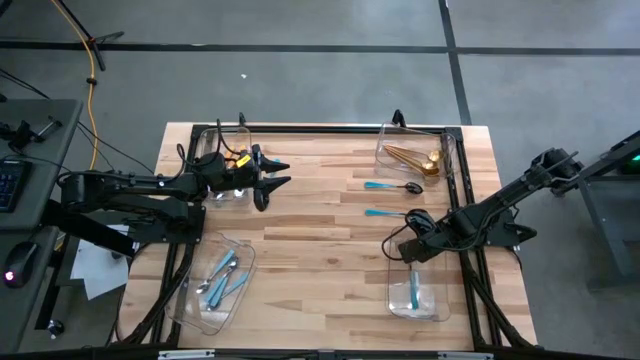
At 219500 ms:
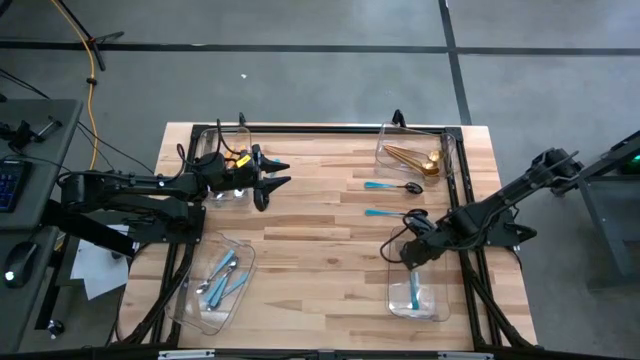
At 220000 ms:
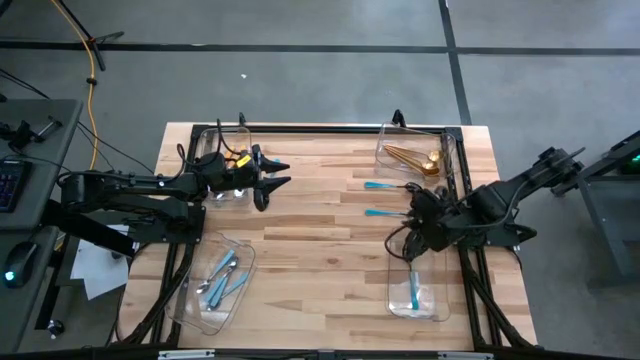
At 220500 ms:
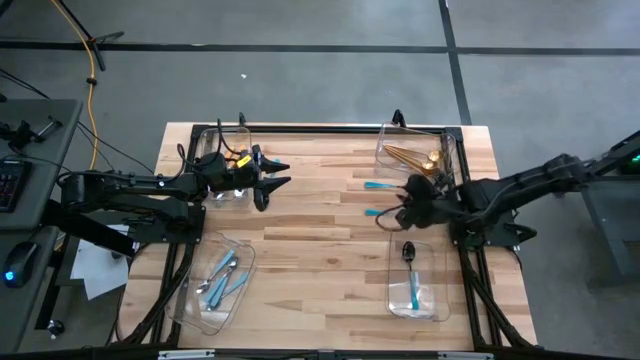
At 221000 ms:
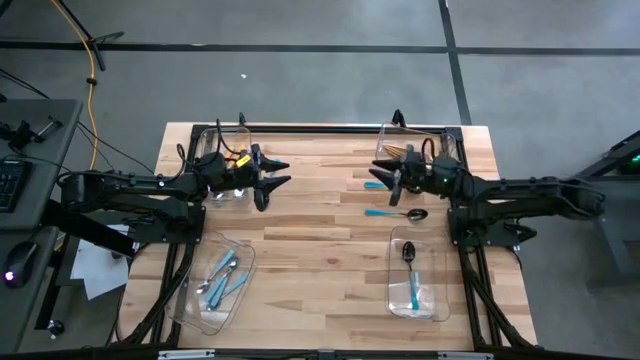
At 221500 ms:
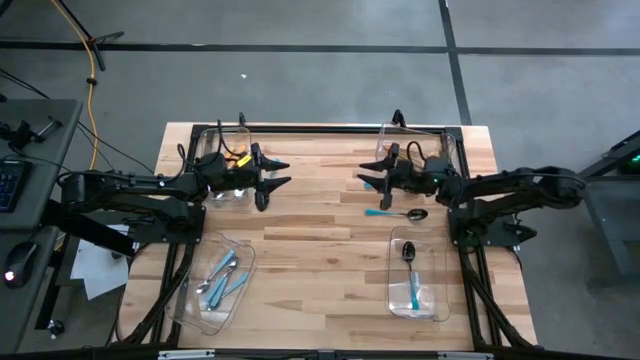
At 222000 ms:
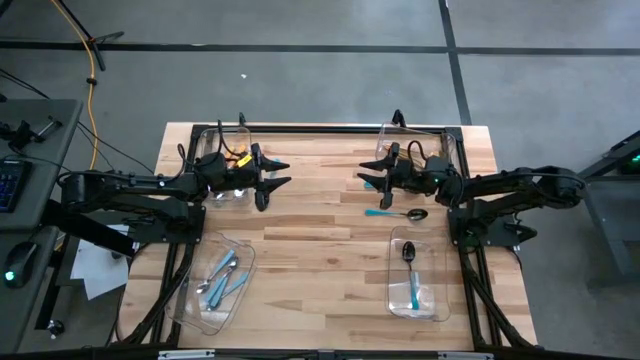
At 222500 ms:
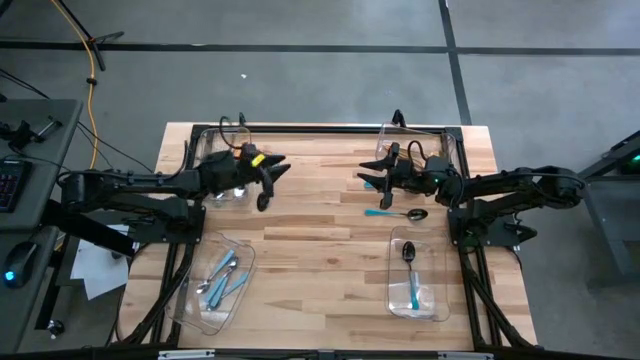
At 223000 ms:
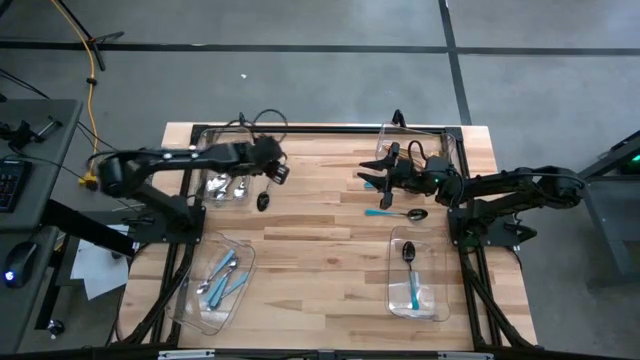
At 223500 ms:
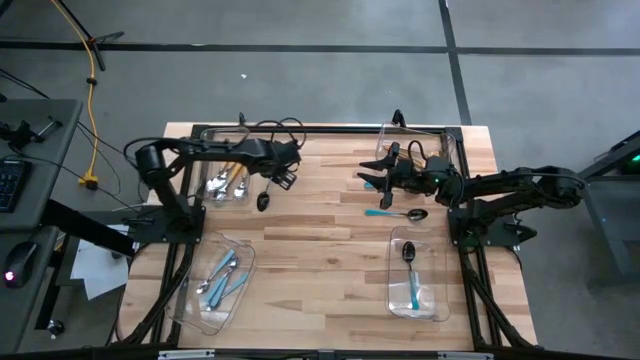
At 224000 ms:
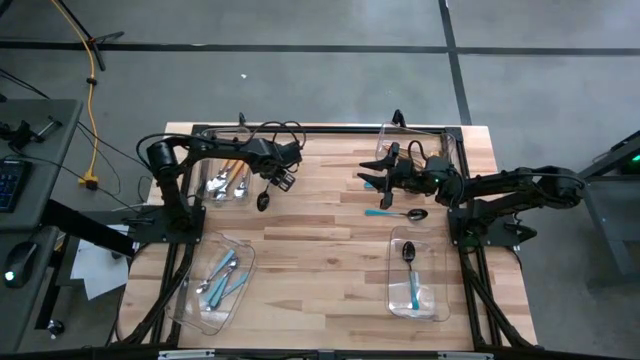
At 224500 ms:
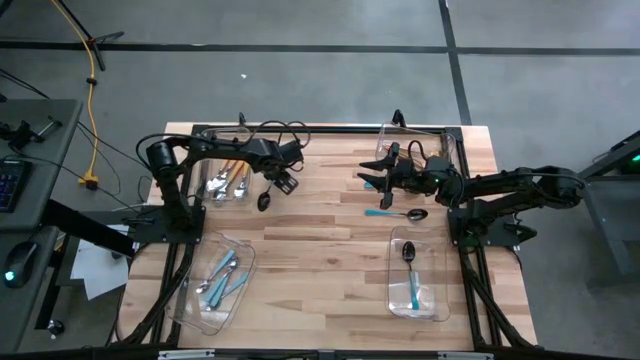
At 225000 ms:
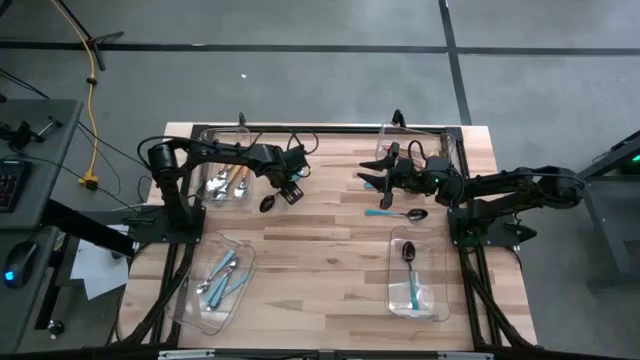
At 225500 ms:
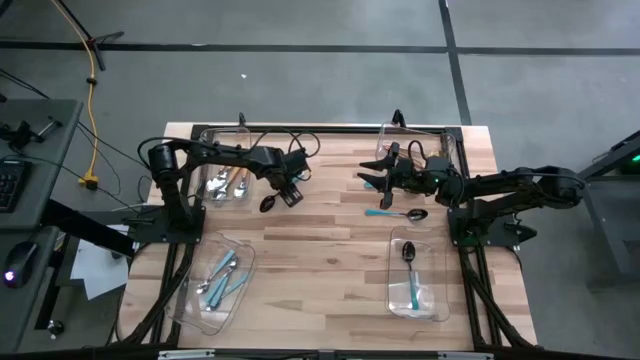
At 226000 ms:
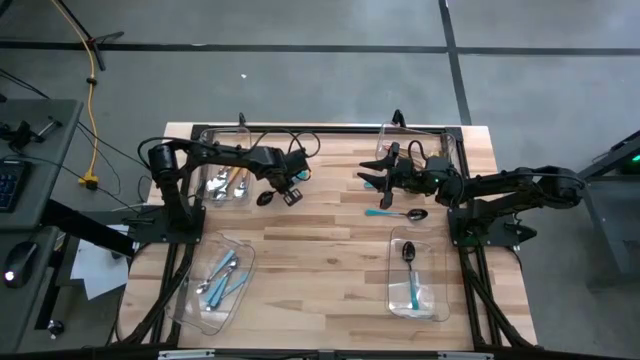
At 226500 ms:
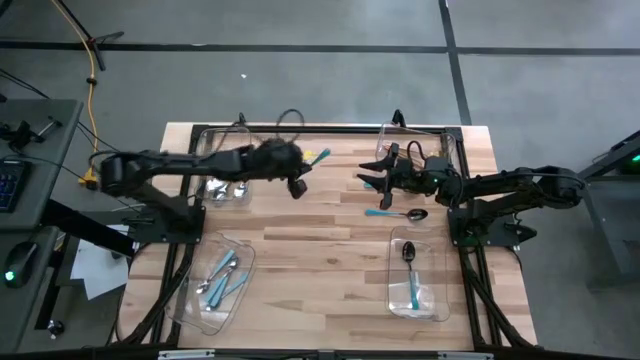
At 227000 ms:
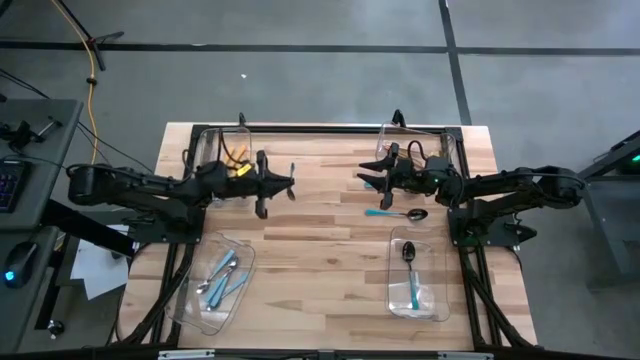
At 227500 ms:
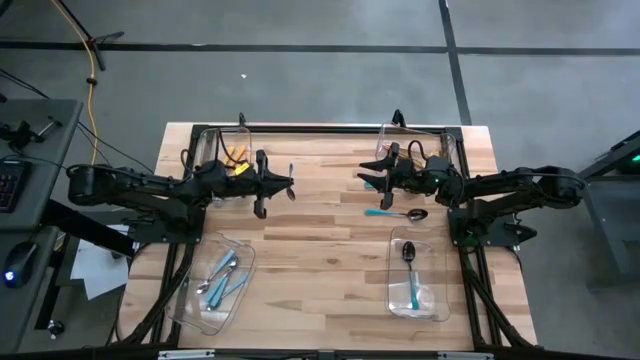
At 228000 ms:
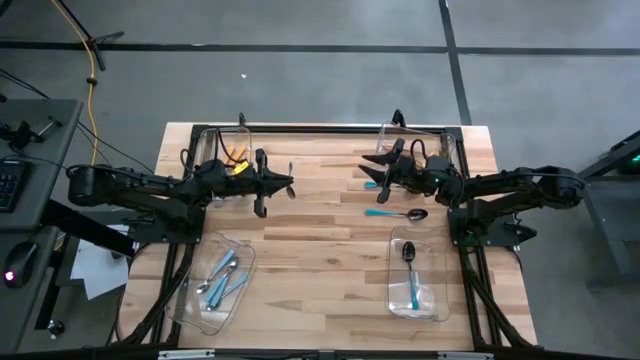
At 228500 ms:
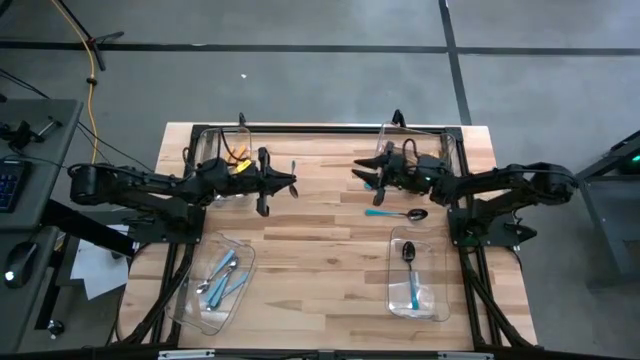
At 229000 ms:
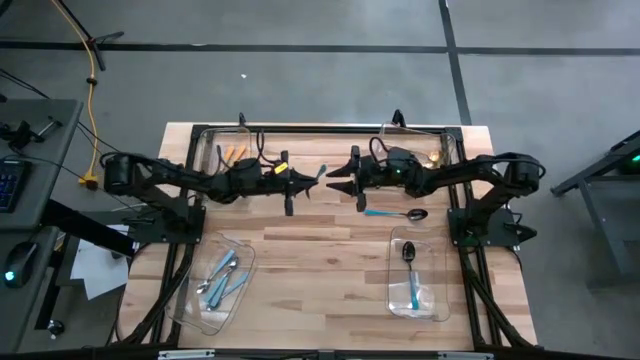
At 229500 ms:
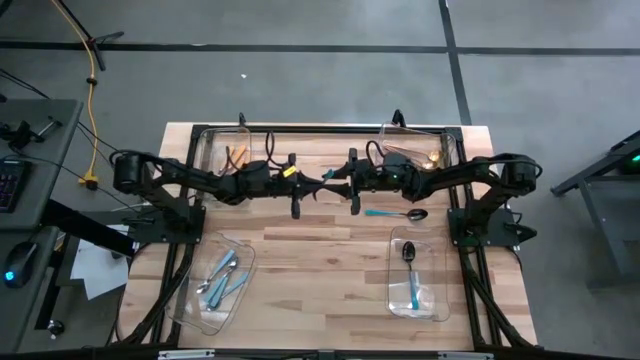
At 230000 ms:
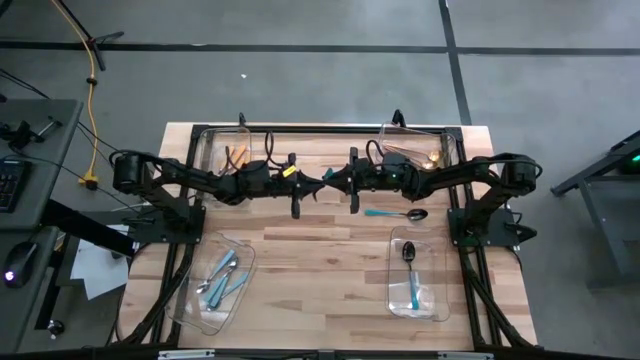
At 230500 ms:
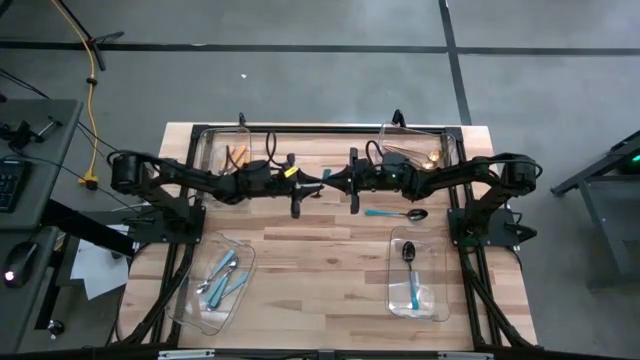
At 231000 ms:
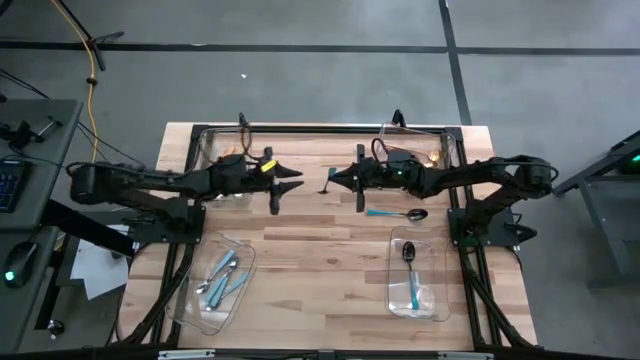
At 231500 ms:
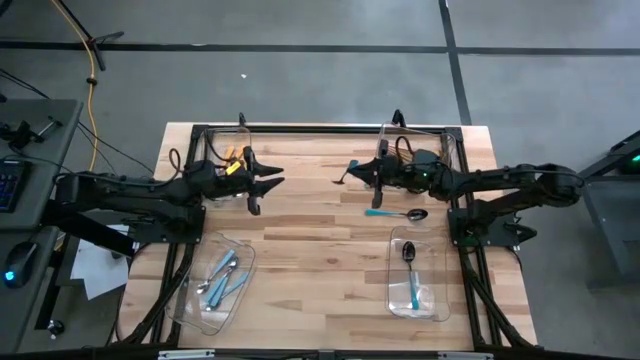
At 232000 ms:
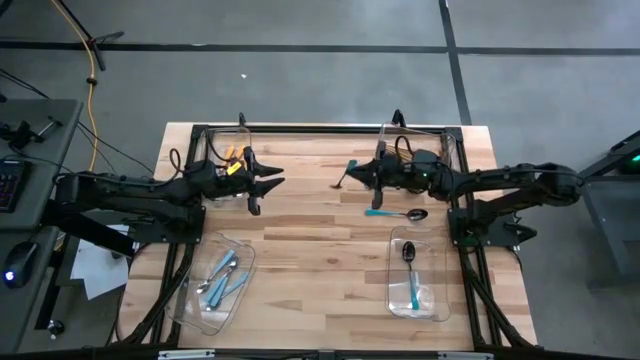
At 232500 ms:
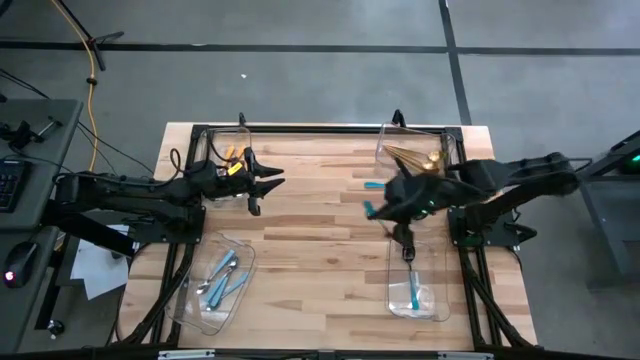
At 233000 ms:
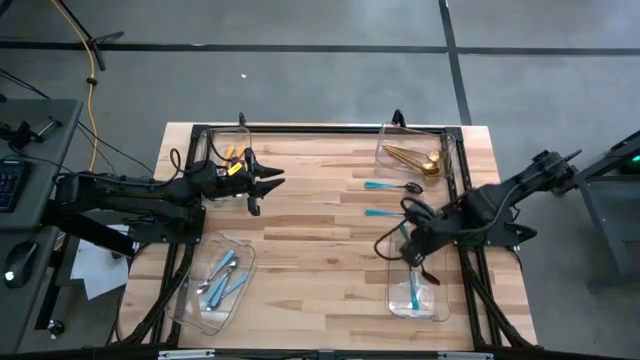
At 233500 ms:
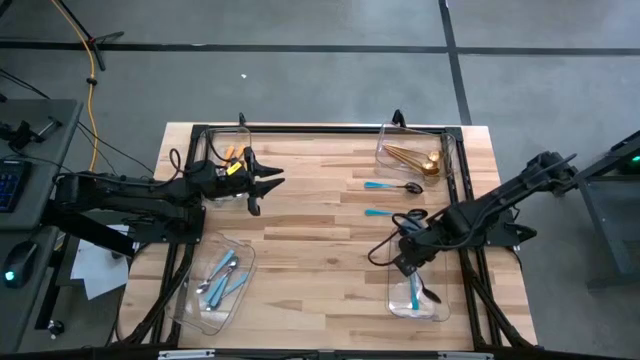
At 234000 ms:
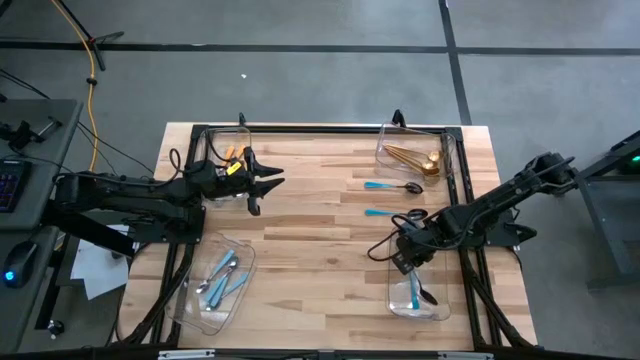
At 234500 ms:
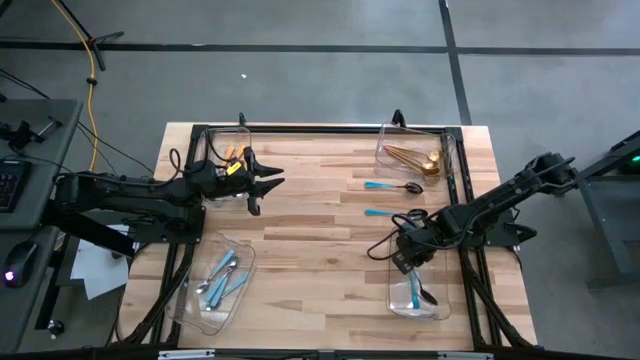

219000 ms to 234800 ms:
Task: Sort silverware by color (type)
Put the blue spoon into the bottom right transparent bin

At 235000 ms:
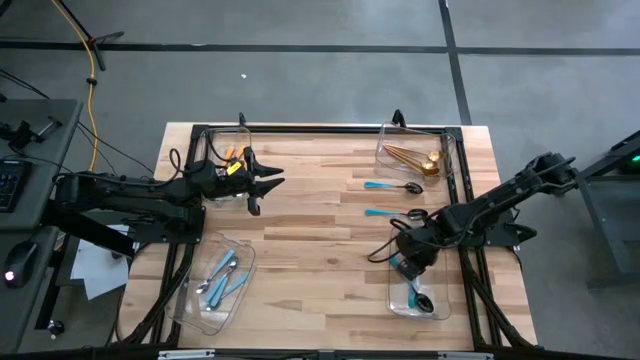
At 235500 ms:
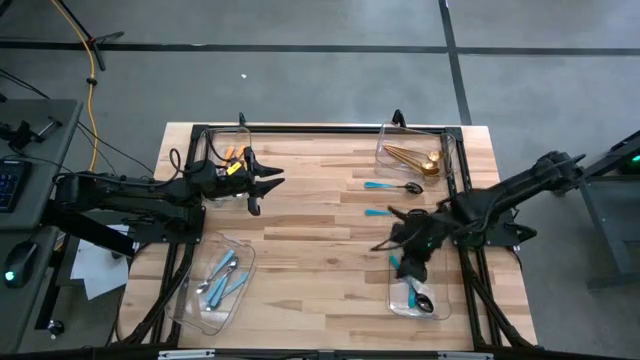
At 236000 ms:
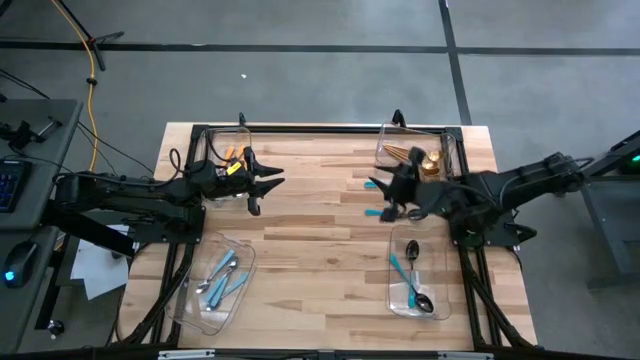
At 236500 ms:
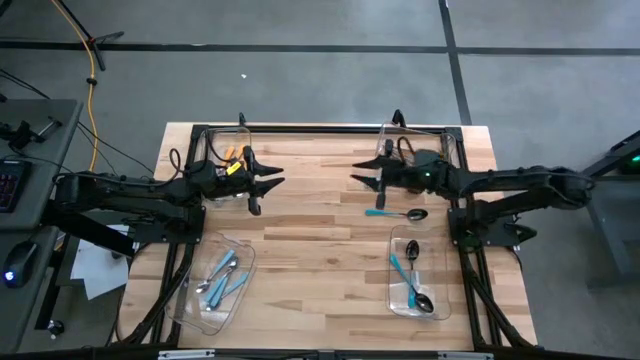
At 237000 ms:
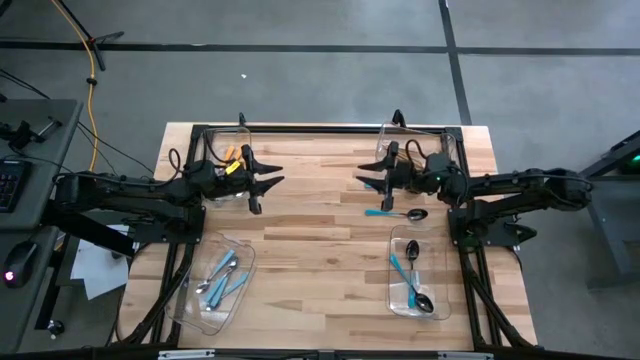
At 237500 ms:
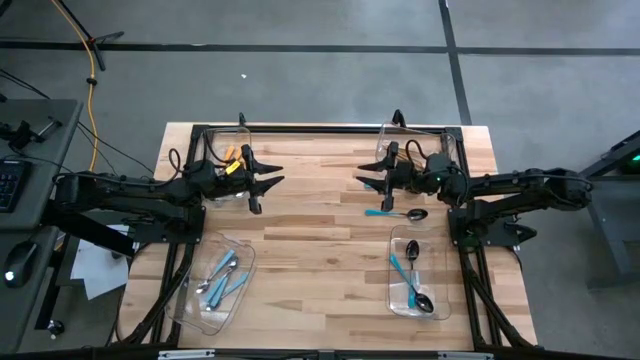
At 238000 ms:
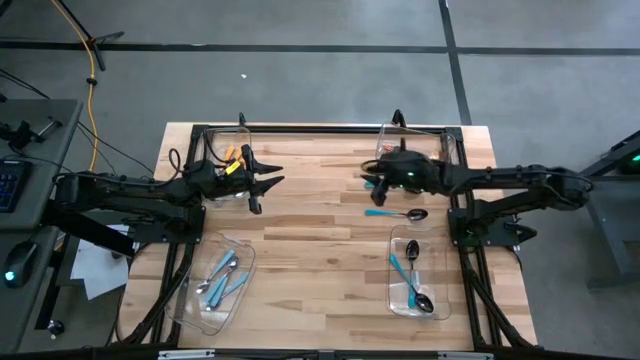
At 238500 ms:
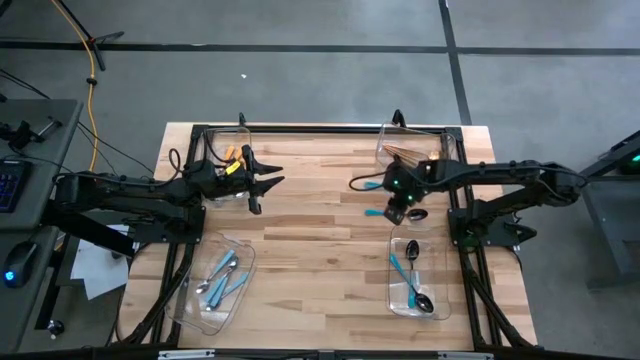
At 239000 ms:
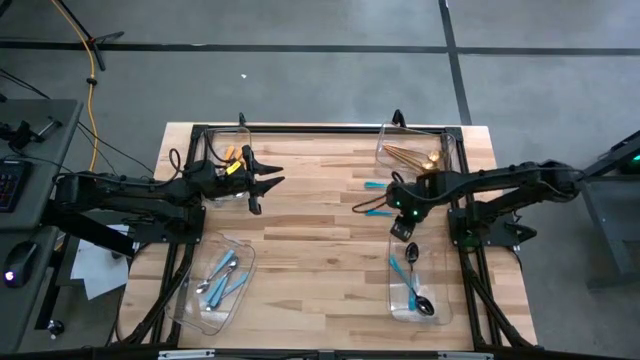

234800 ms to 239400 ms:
Adjust the bottom right transparent bin on the table

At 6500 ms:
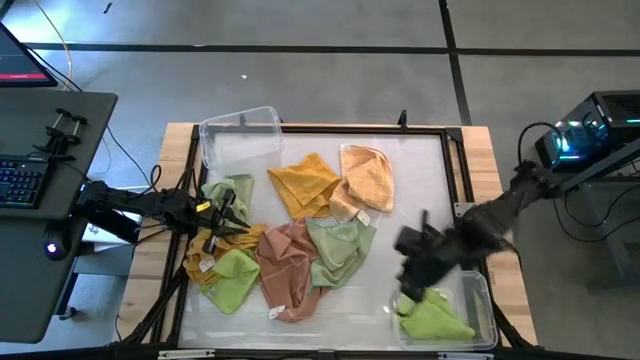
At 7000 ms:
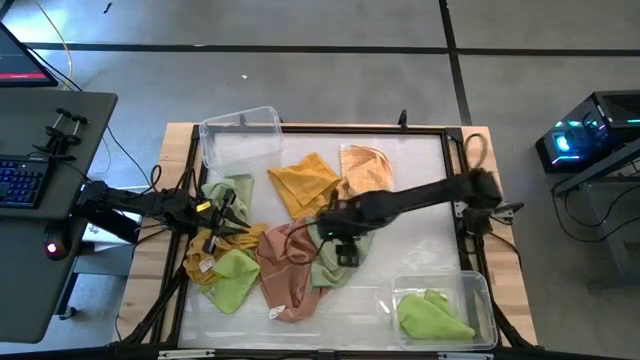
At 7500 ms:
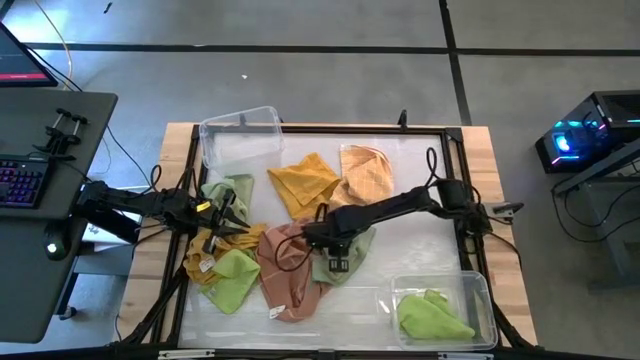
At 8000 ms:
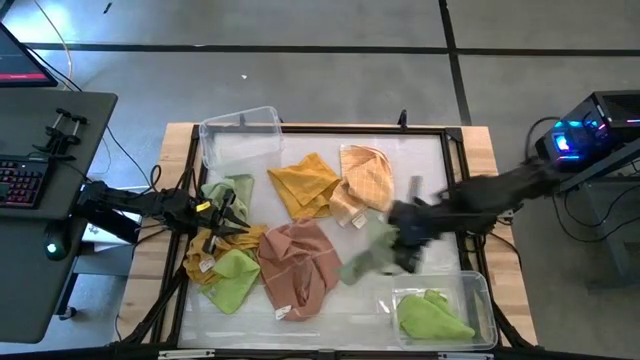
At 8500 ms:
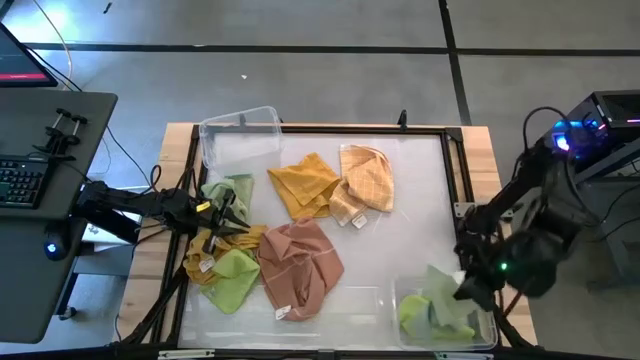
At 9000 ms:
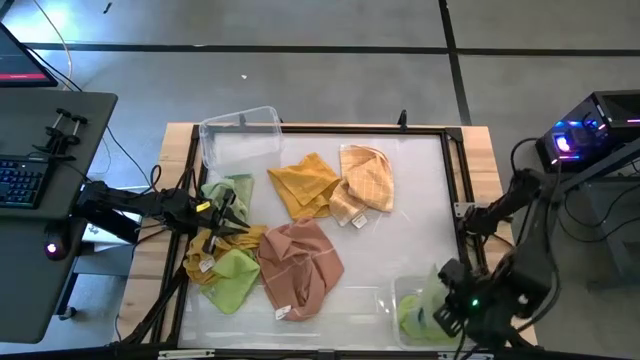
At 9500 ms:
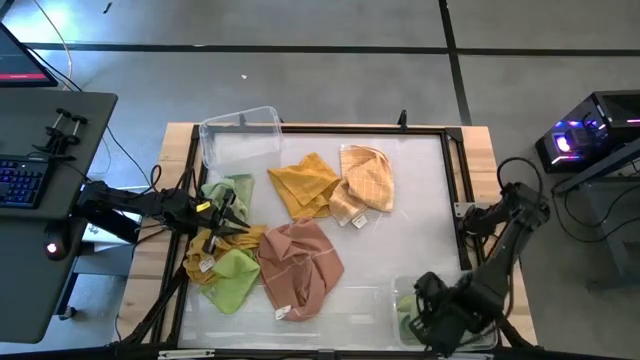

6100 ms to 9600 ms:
Task: Sort towels by color in basket
Put the right green microfiber towel into the bottom transparent bin
